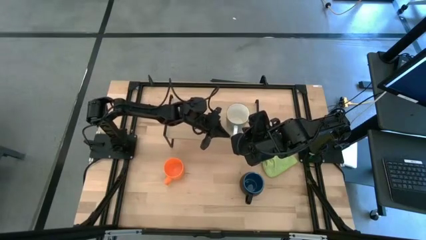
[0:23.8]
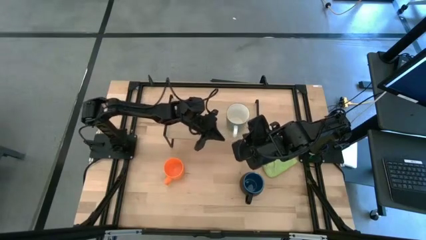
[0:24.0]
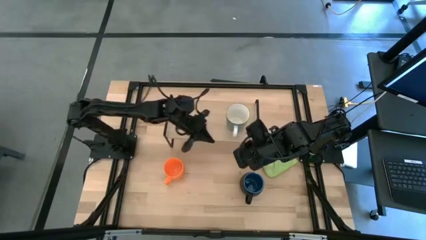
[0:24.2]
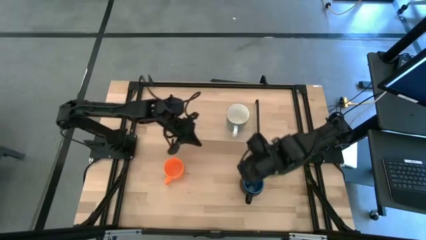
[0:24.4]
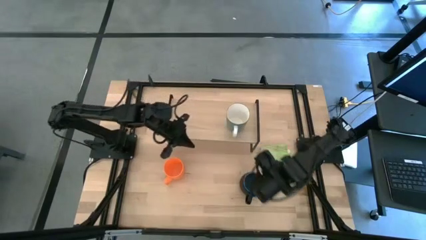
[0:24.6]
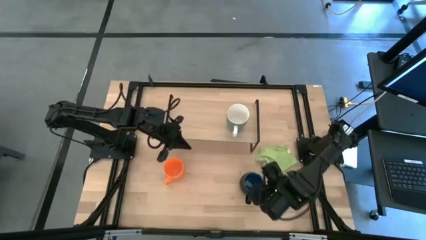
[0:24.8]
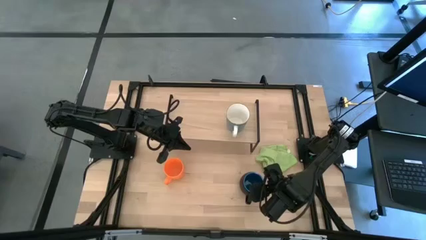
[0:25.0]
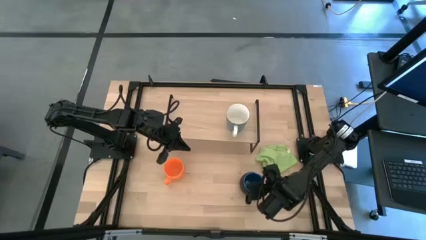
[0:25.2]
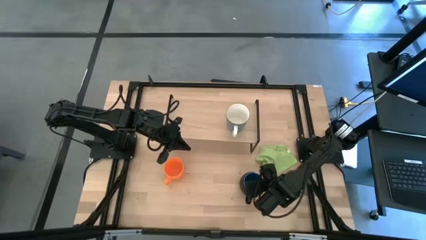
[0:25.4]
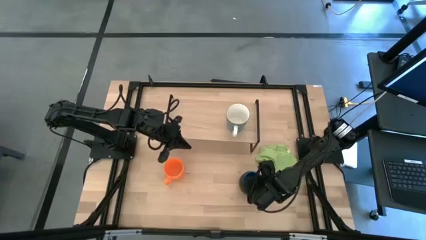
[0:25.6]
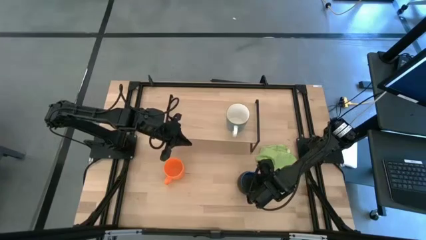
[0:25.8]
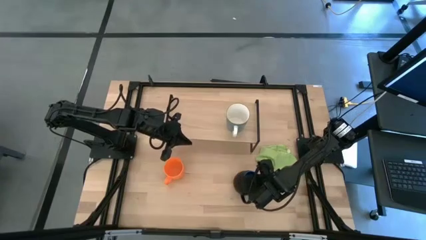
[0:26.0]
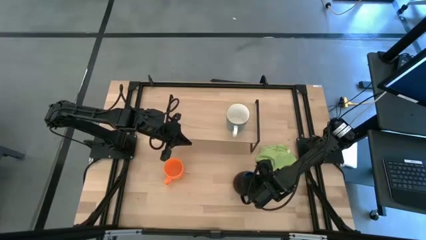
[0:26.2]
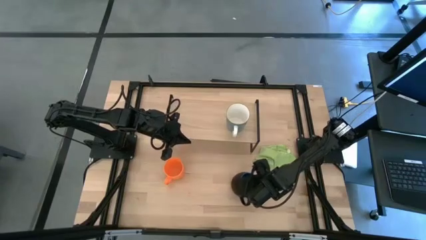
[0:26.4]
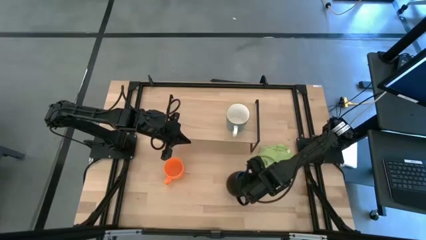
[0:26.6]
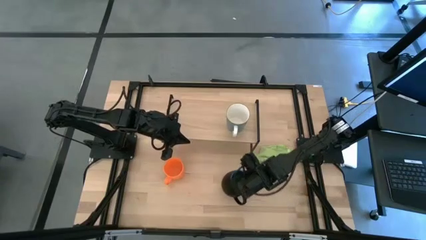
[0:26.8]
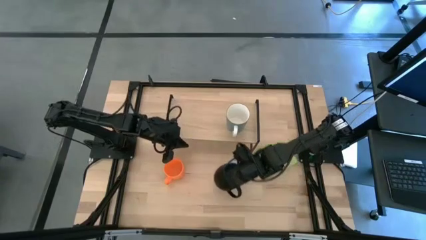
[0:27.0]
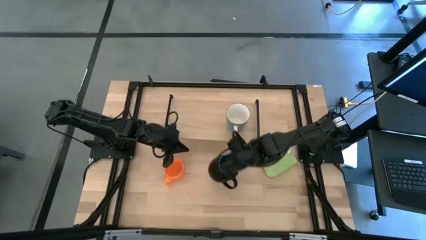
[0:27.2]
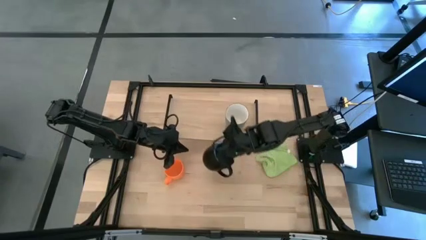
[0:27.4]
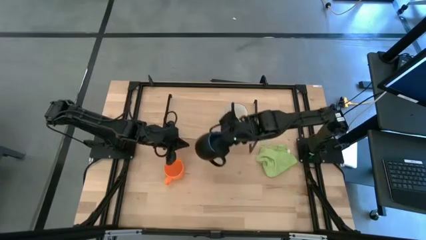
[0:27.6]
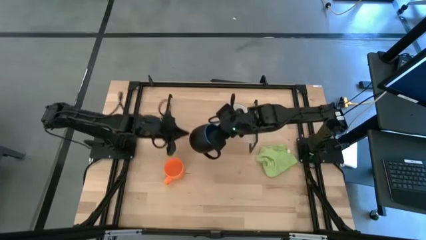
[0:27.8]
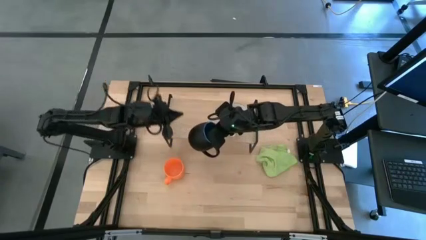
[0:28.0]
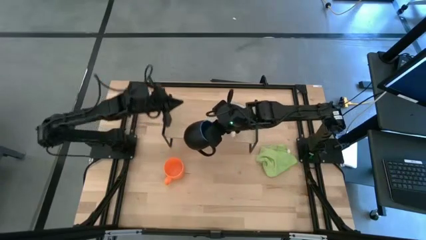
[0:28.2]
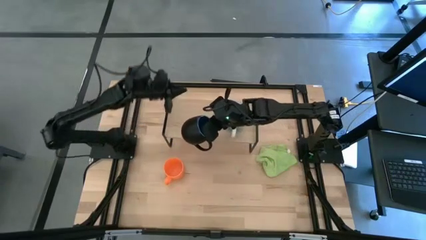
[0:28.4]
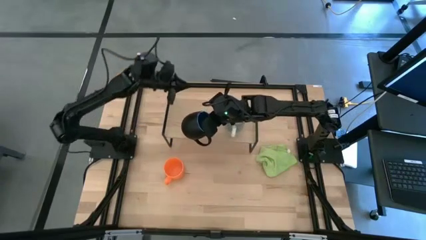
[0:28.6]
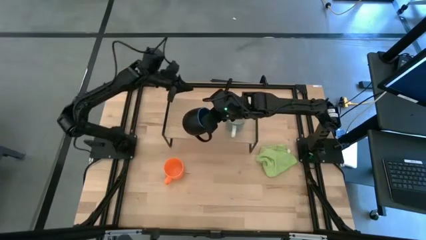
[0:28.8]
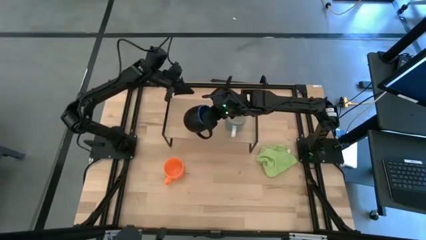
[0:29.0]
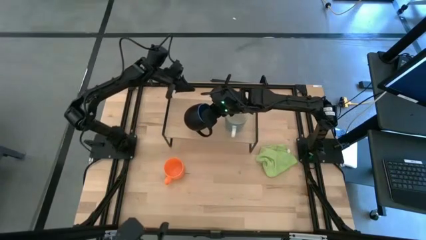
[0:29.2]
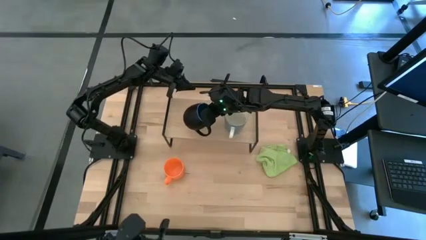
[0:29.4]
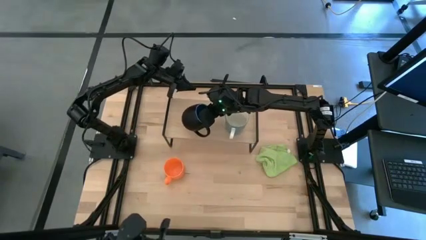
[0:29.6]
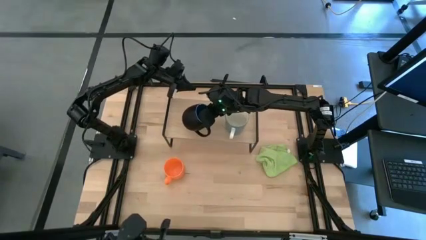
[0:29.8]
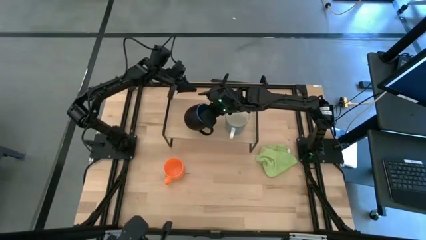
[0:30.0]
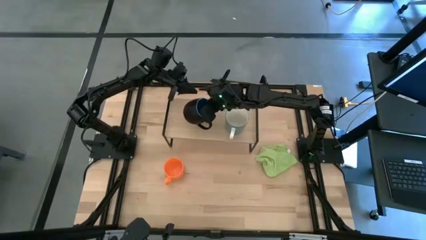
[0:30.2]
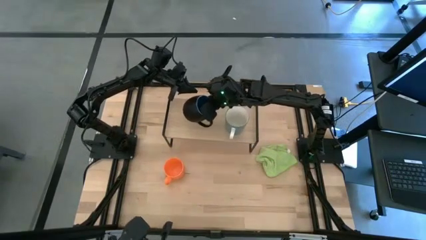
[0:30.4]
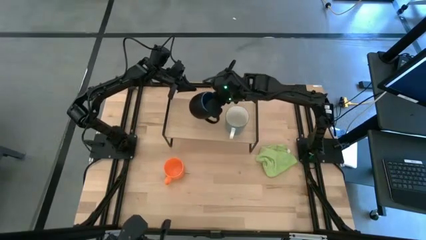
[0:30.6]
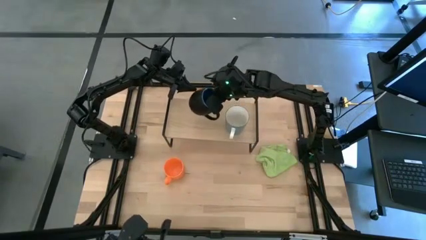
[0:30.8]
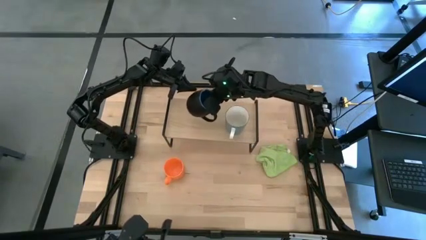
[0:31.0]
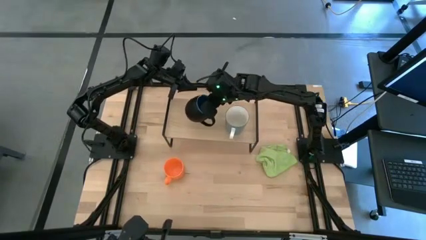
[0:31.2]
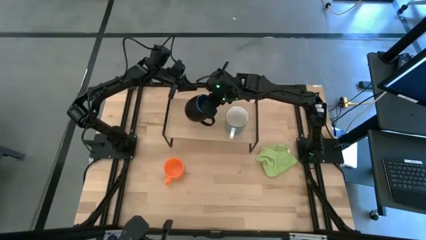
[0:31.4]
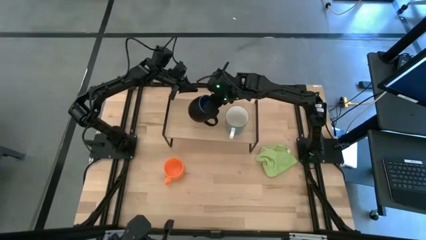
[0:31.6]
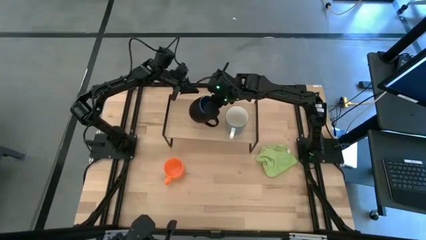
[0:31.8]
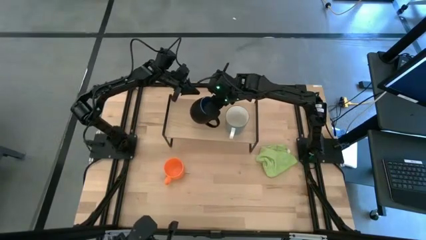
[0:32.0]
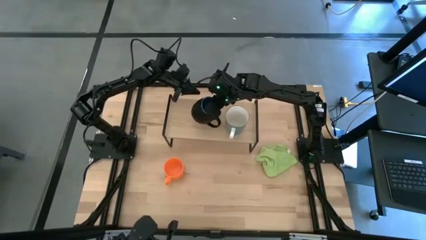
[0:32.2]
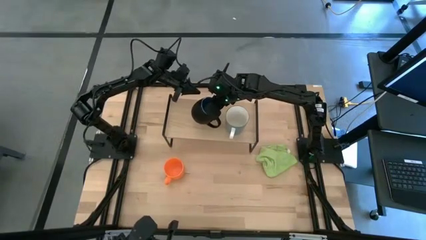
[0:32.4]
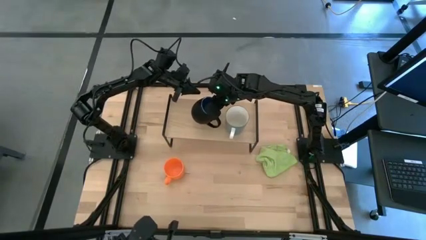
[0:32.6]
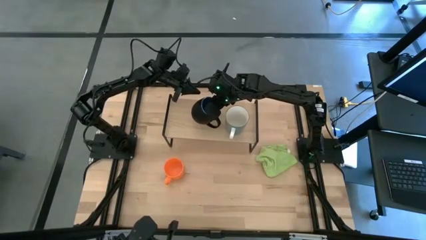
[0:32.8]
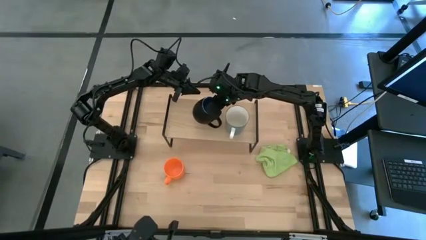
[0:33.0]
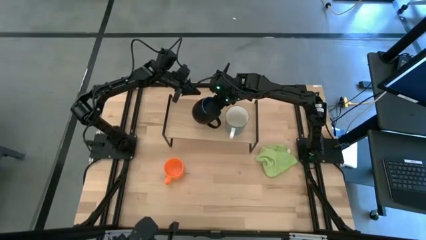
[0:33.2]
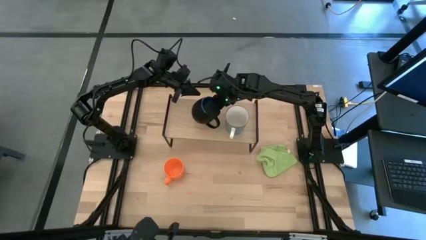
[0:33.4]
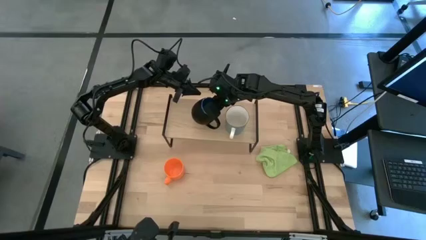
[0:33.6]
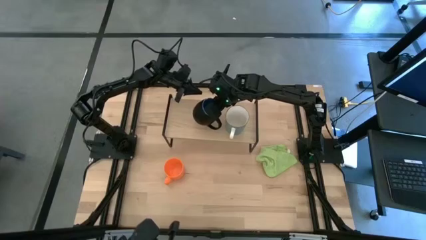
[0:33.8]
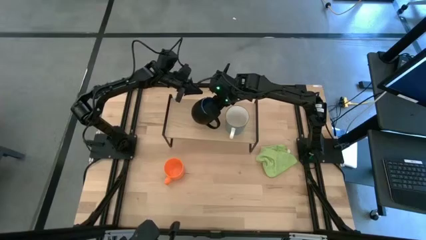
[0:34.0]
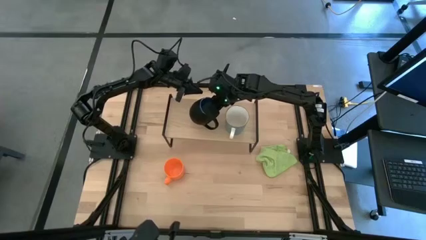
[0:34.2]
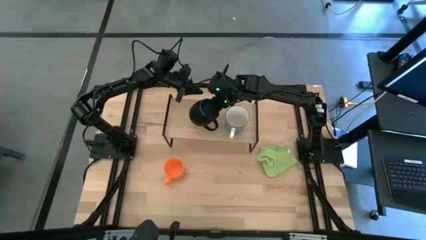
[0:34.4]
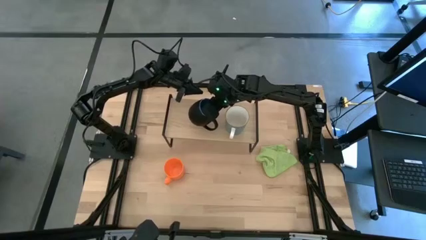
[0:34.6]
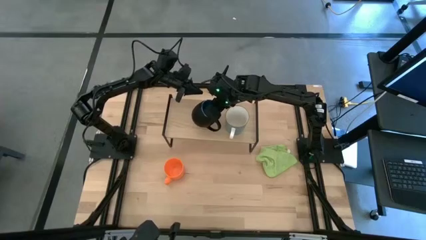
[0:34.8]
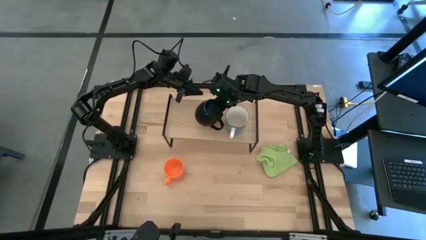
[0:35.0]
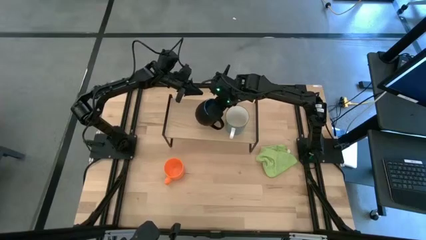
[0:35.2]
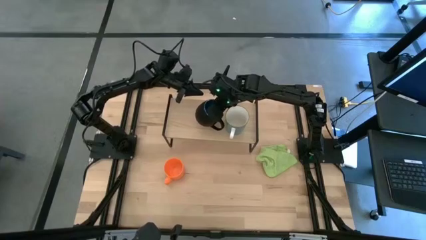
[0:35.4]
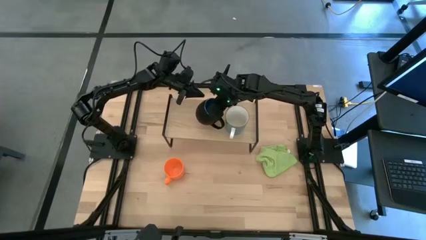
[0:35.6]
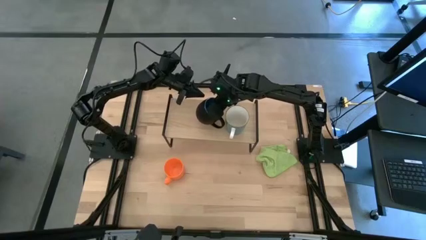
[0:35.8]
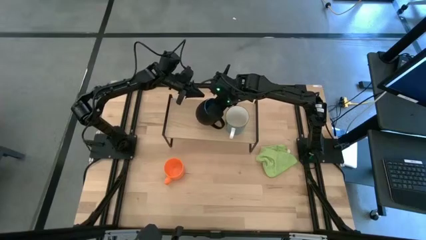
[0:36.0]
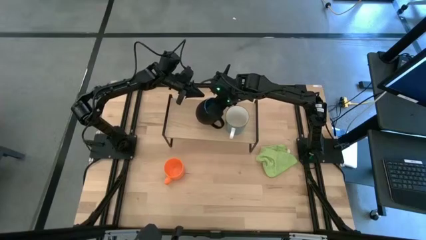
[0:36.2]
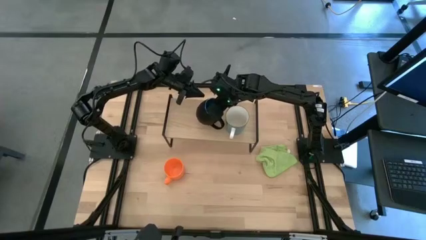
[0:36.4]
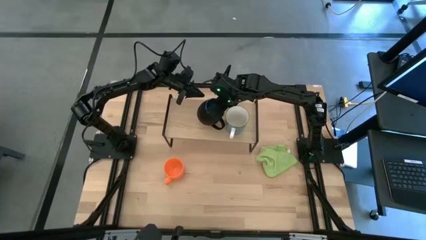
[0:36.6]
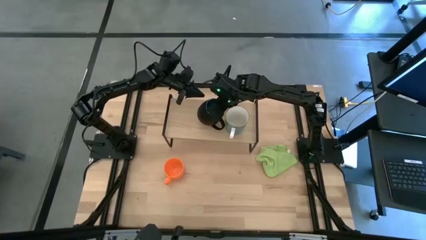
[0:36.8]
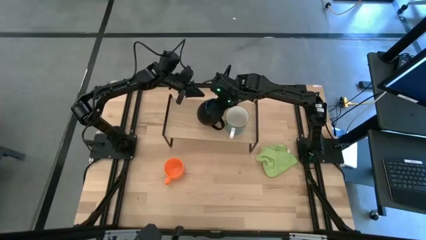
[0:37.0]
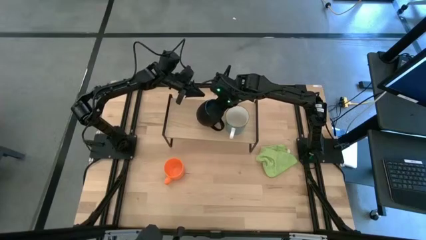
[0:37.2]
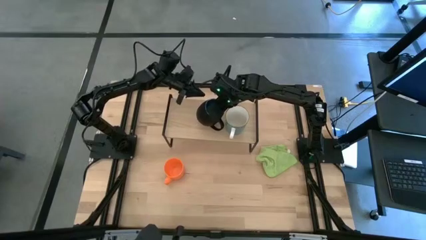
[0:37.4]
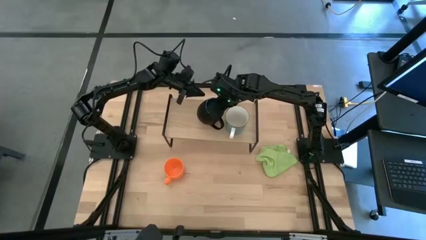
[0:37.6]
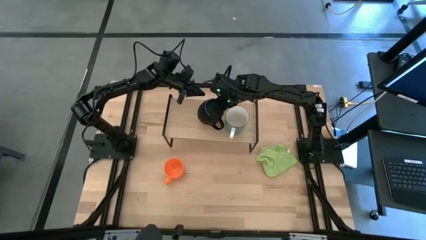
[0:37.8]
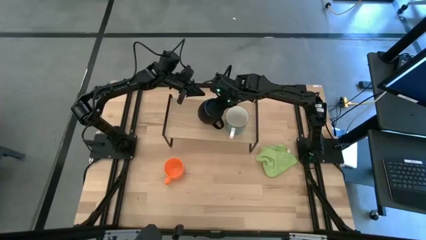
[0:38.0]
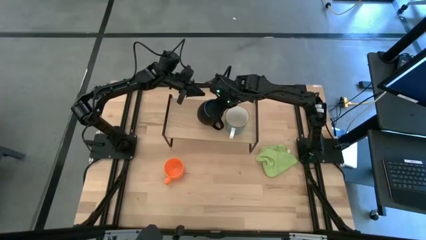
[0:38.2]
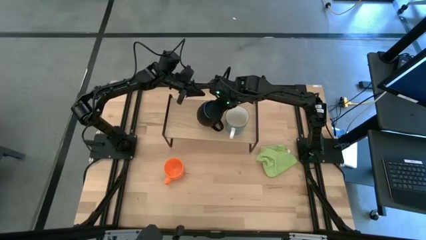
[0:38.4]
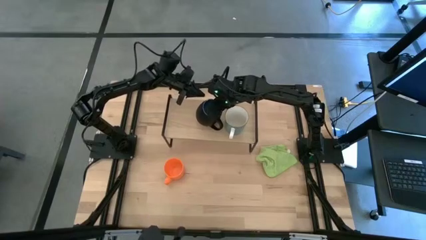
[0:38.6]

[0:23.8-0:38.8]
Task: Stack small to large cups/mugs on shelf
Put the black and blue mug on the shelf
